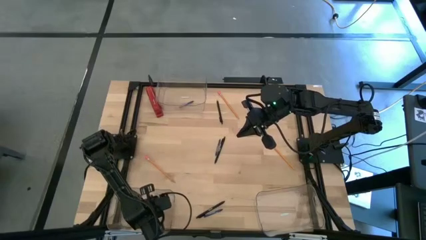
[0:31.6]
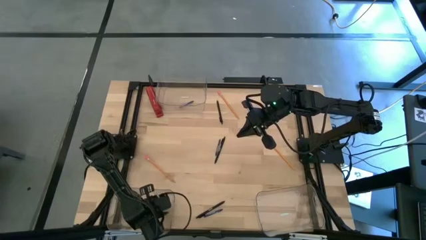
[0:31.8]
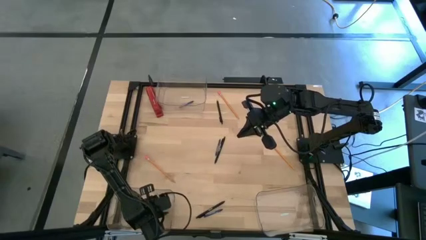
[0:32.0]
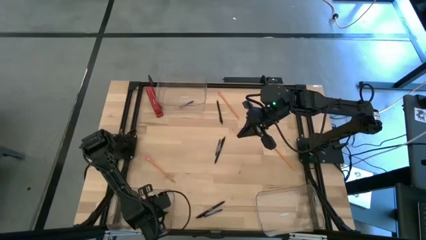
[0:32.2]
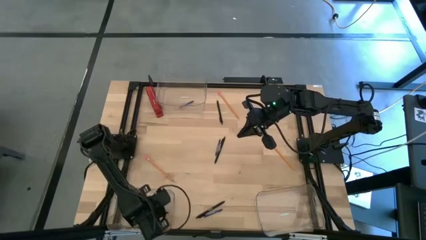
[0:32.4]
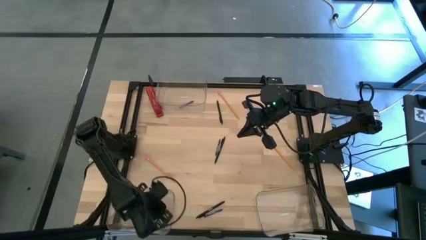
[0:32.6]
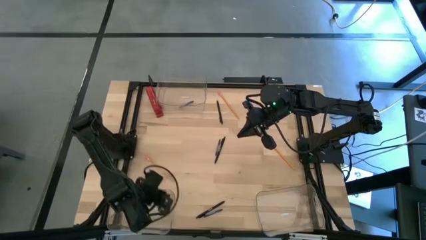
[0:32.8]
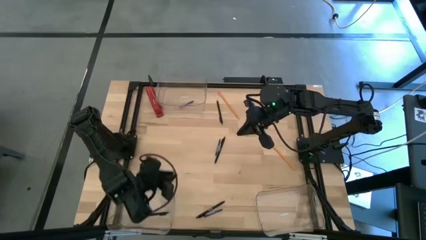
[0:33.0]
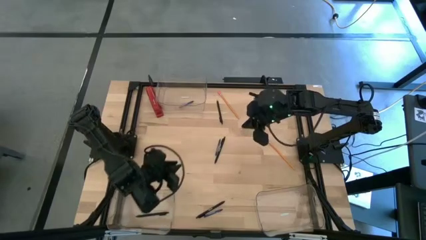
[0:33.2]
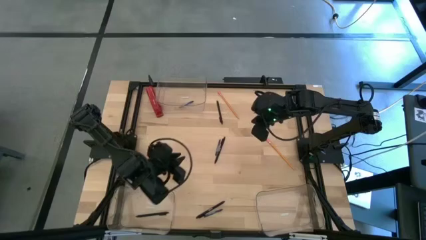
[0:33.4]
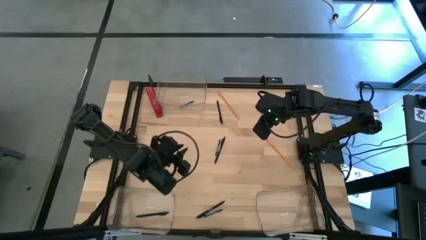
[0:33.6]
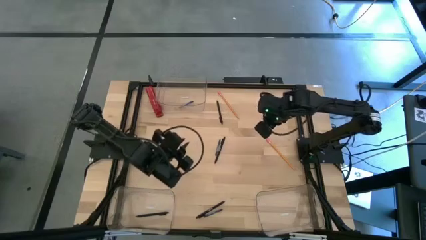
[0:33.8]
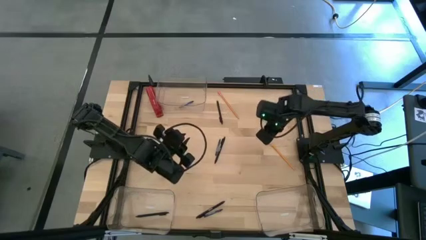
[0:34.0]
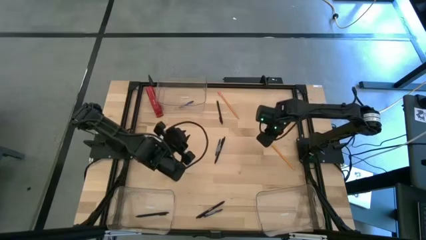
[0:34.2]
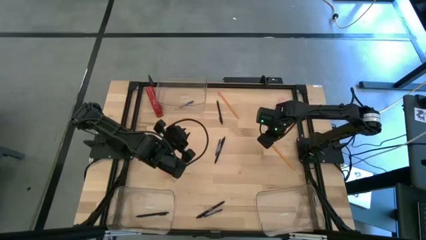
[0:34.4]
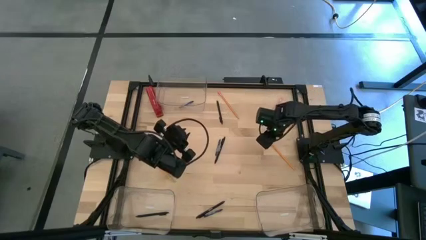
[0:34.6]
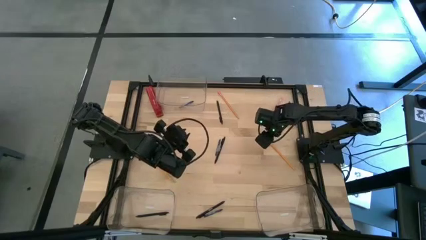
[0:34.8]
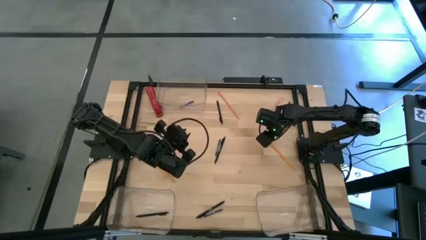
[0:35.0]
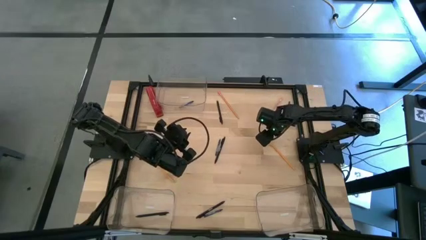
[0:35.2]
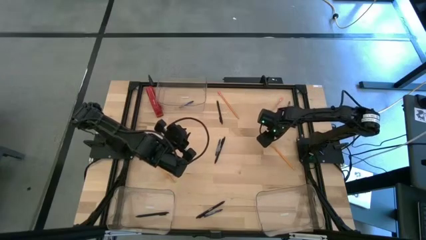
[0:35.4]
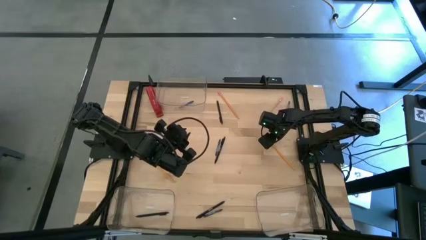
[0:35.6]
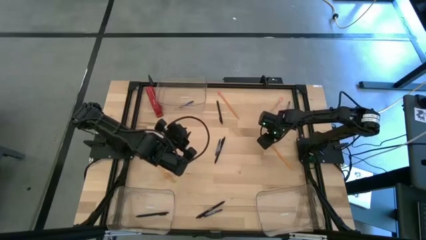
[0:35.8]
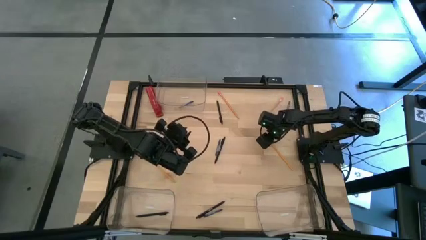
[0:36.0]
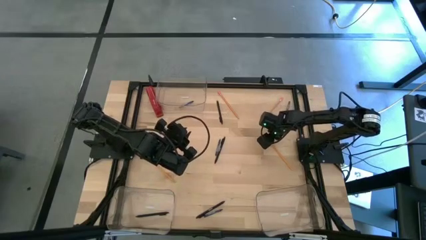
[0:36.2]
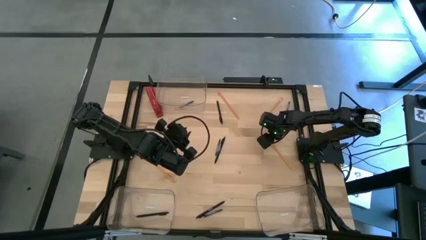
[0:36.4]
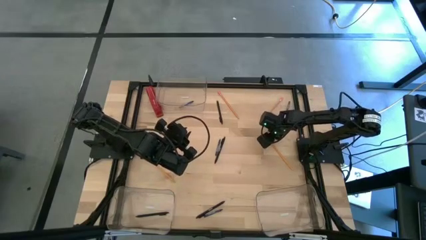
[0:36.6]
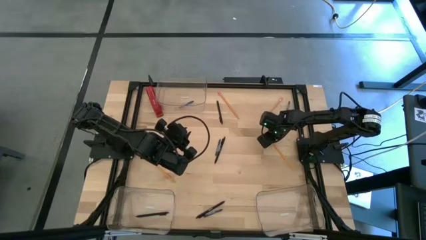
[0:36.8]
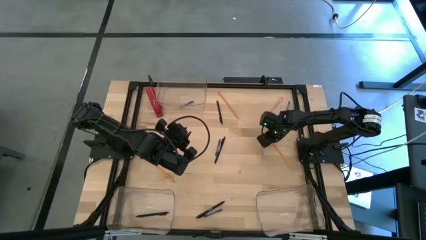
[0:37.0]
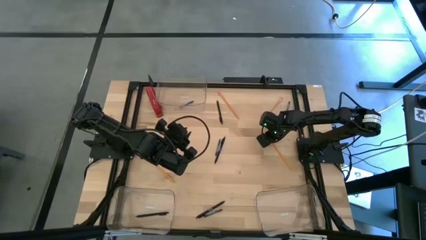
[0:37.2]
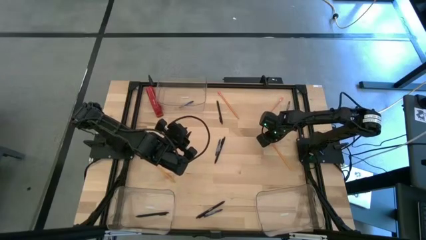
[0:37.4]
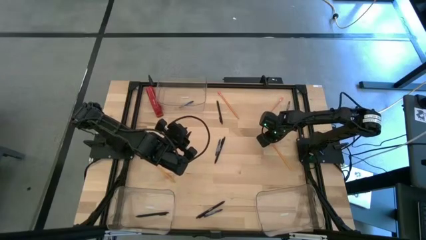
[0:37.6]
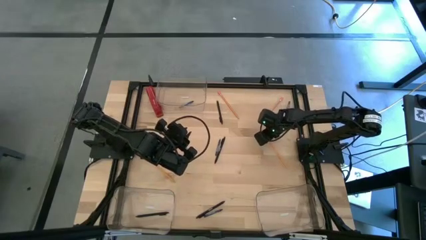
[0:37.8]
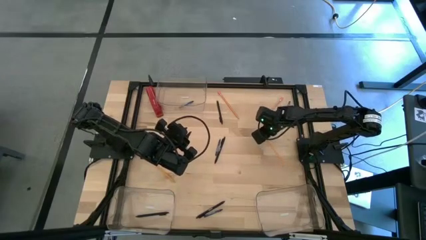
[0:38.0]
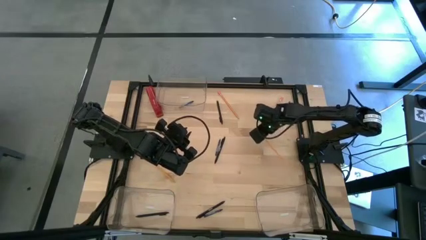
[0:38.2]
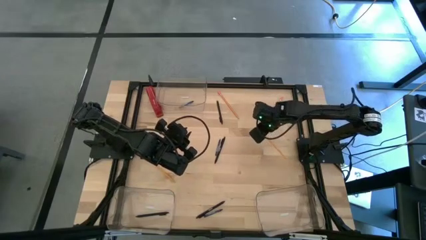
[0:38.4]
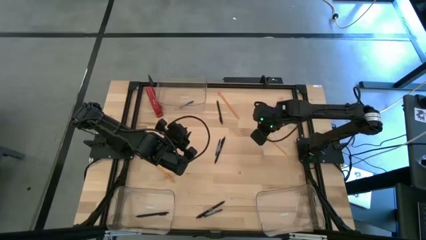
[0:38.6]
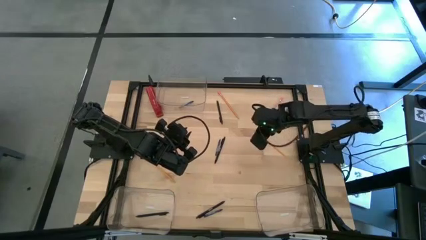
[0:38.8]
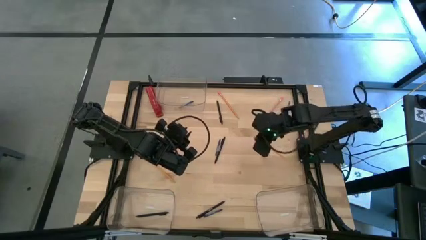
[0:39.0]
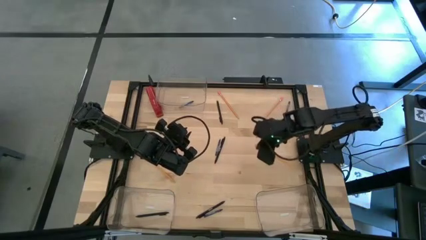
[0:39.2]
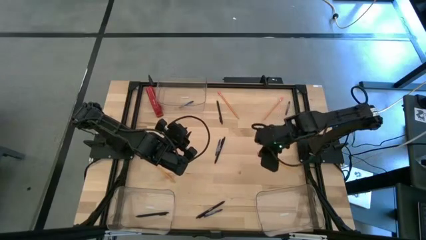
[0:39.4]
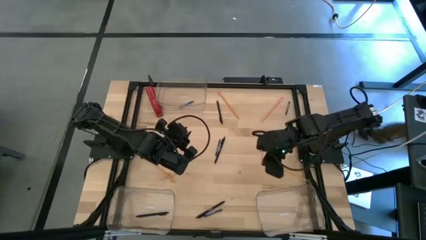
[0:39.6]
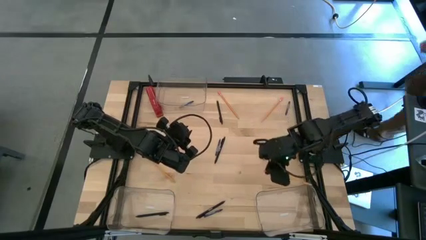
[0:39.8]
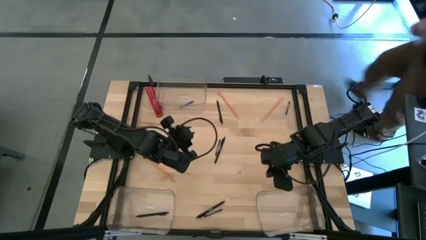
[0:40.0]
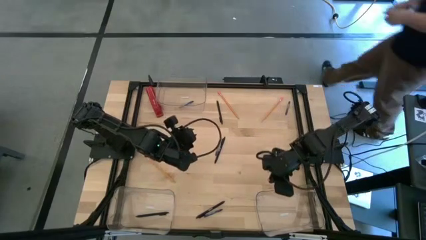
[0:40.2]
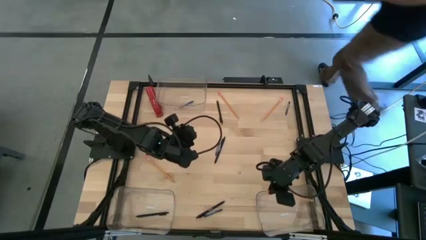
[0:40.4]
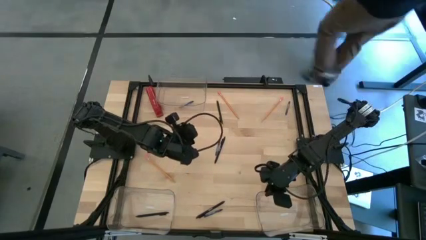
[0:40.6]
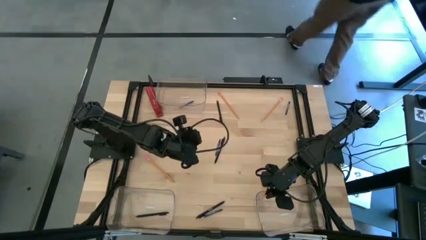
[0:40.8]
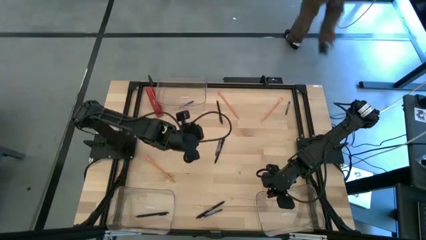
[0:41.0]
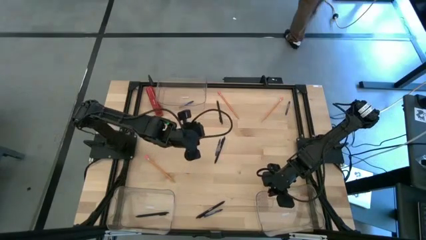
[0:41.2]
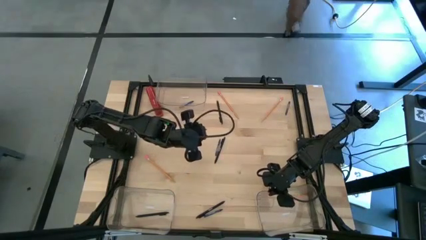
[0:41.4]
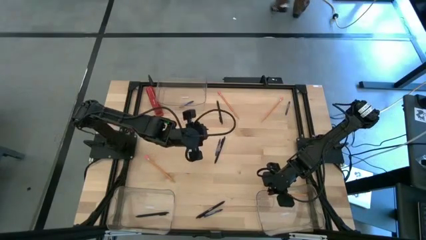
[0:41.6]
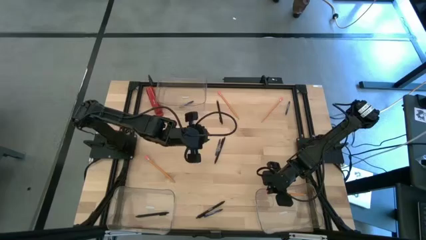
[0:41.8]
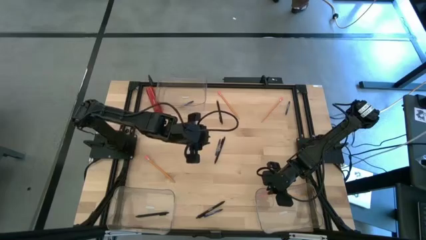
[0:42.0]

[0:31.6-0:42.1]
Task: Sort crayons/erasers/pens/pencils in bins
Put the yellow pencil into the bottom right transparent bin
